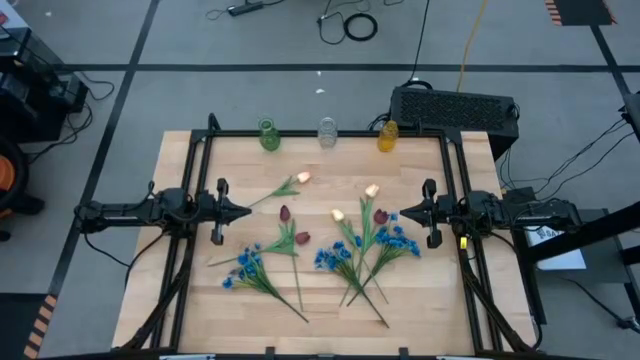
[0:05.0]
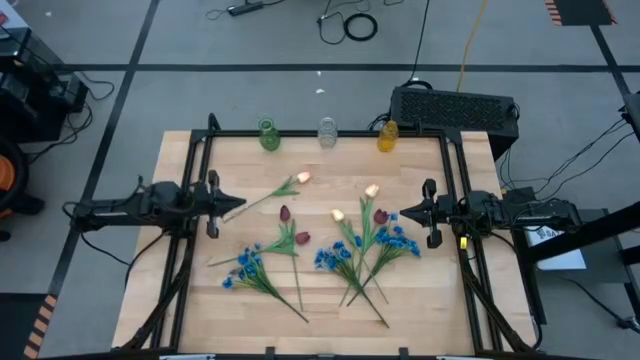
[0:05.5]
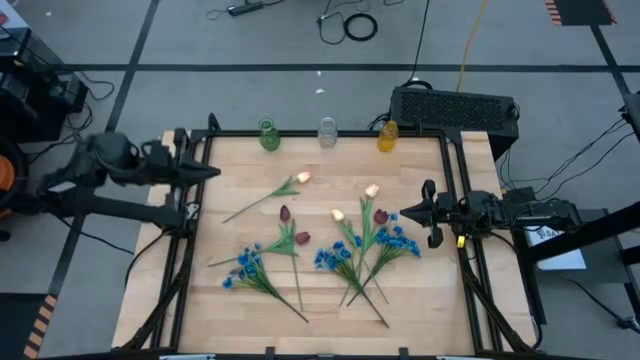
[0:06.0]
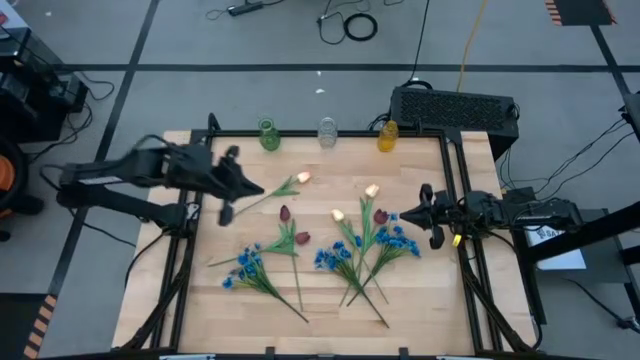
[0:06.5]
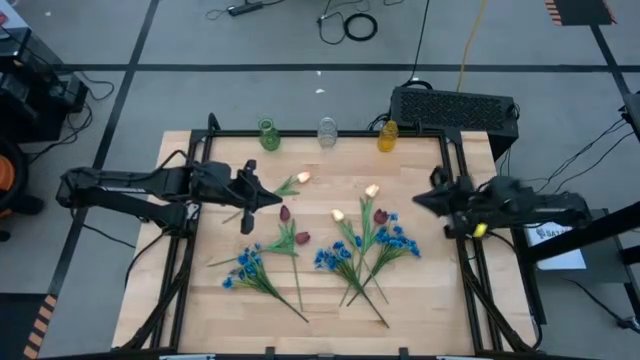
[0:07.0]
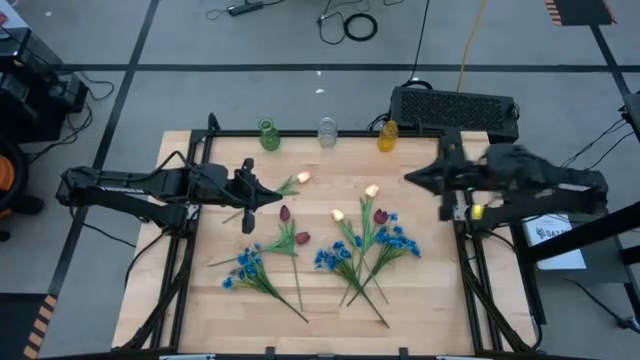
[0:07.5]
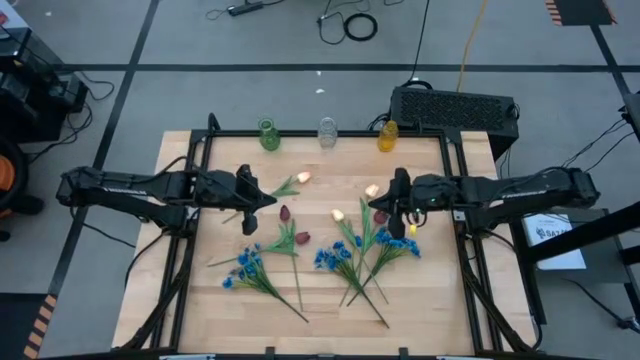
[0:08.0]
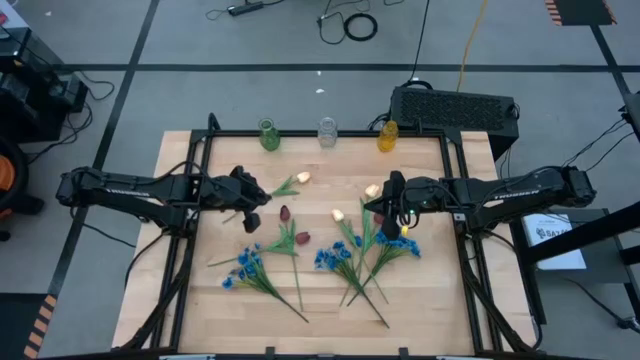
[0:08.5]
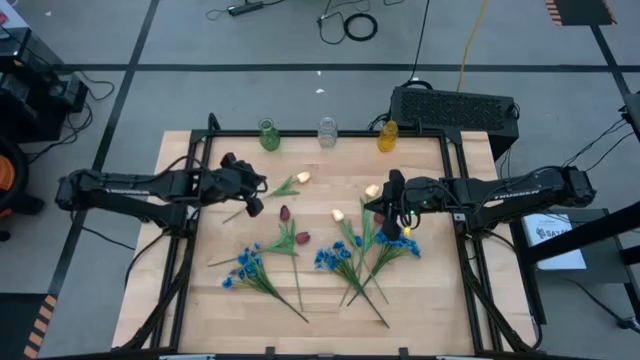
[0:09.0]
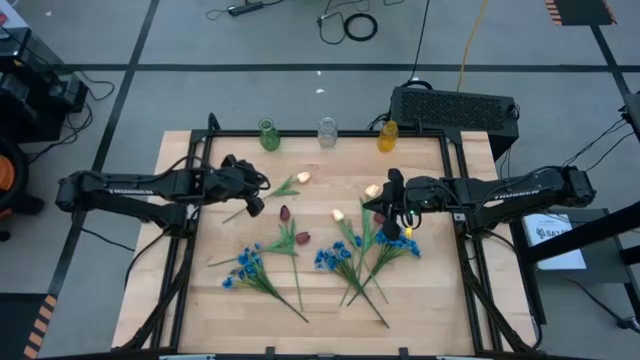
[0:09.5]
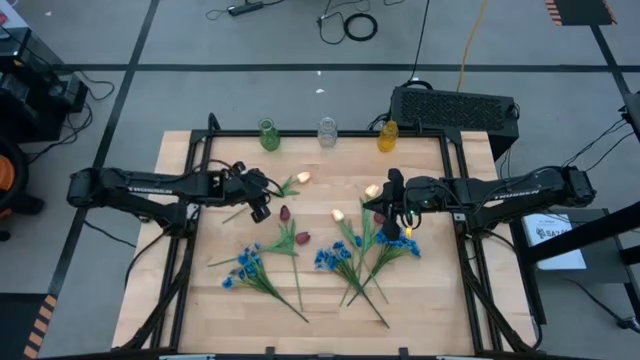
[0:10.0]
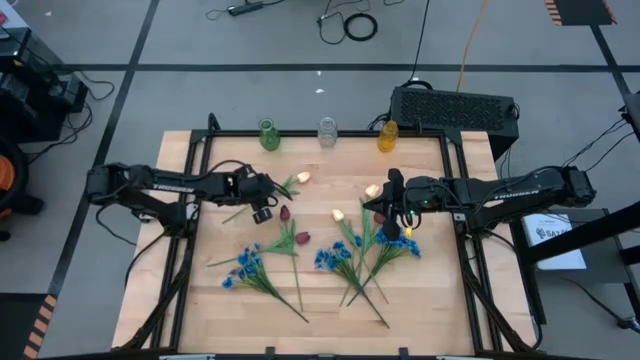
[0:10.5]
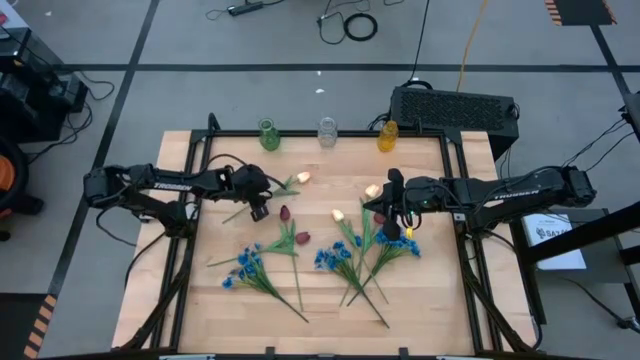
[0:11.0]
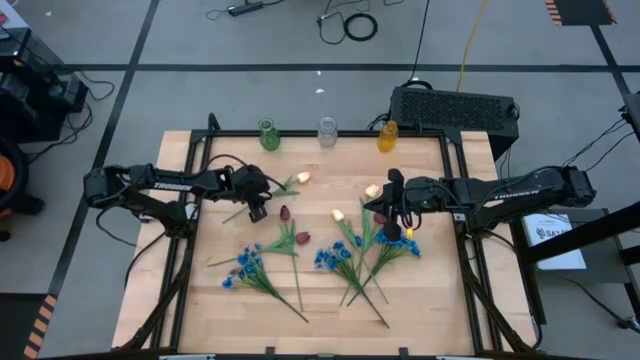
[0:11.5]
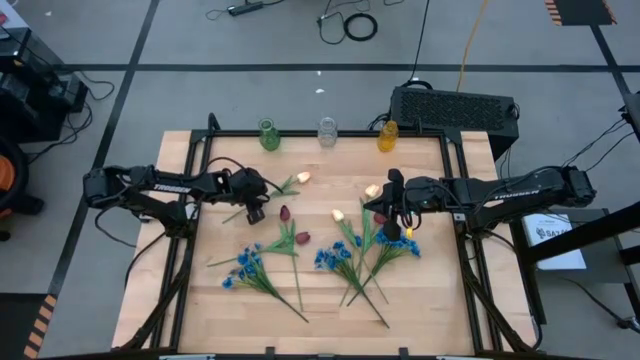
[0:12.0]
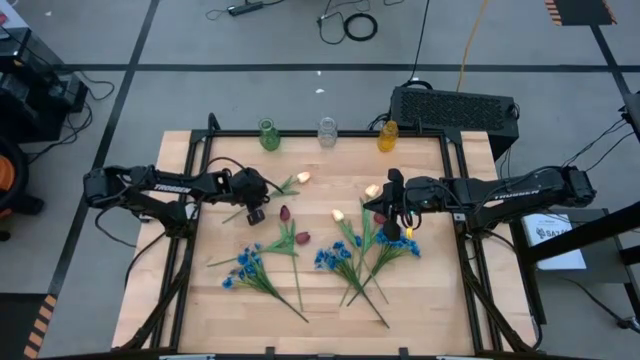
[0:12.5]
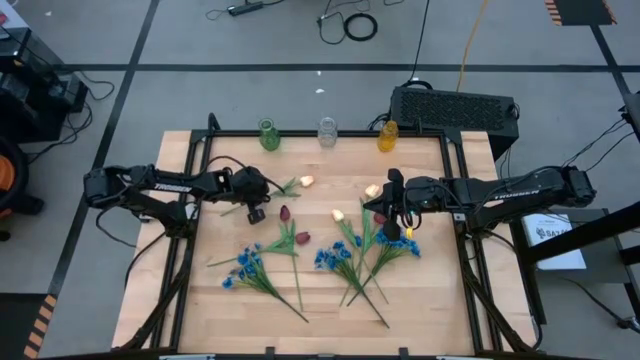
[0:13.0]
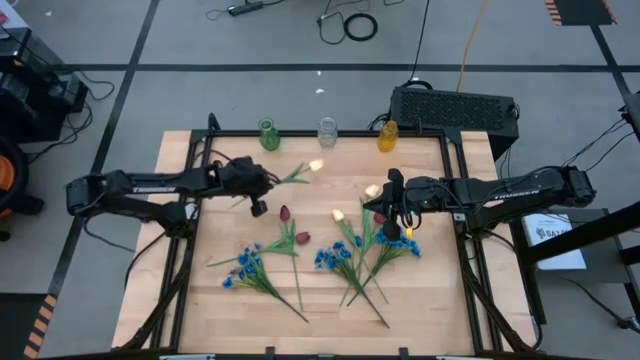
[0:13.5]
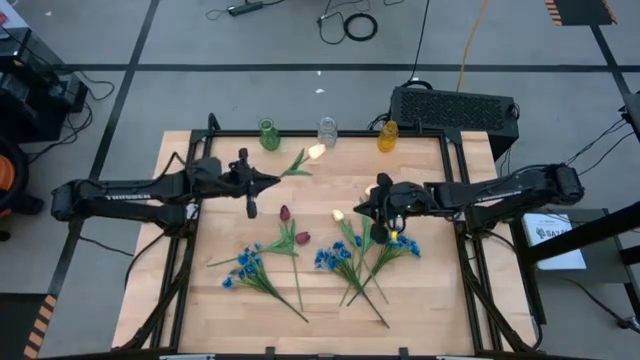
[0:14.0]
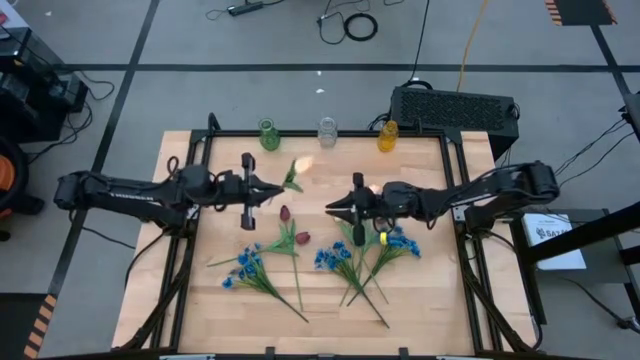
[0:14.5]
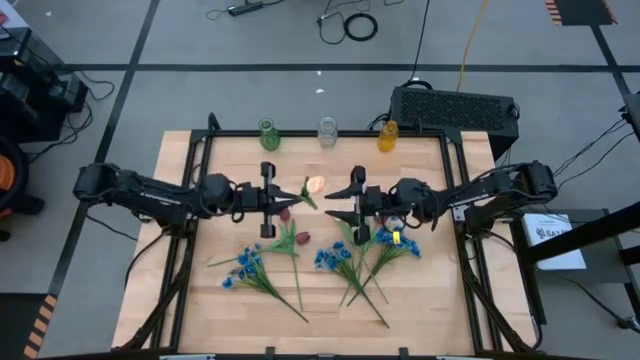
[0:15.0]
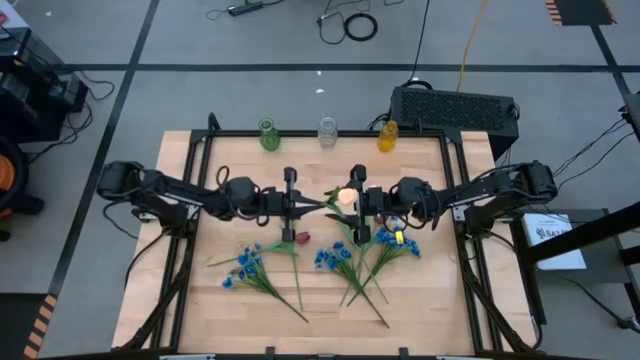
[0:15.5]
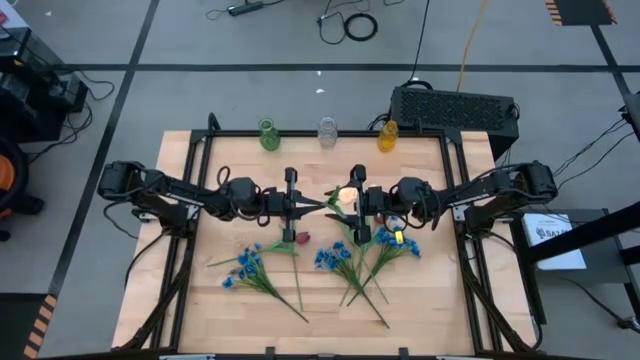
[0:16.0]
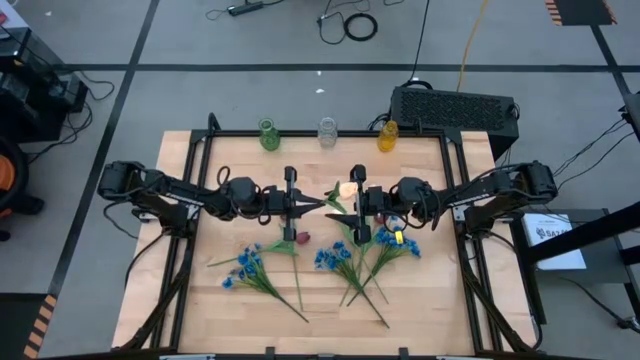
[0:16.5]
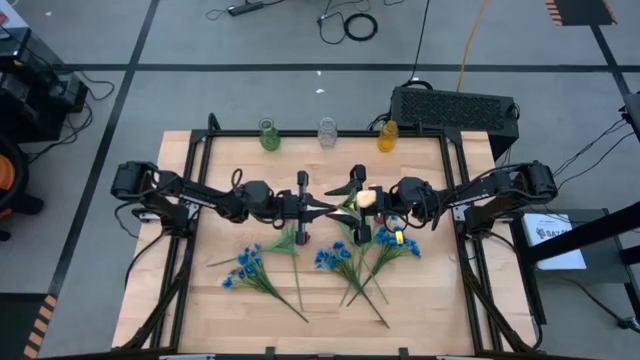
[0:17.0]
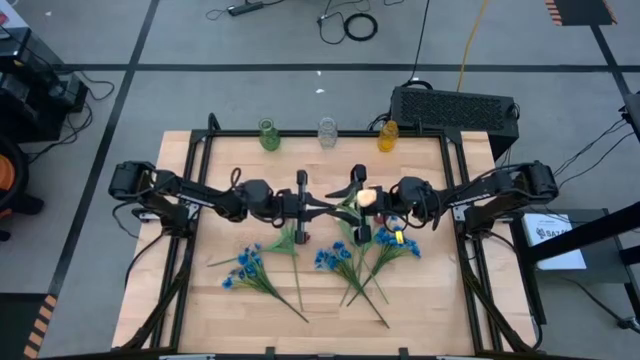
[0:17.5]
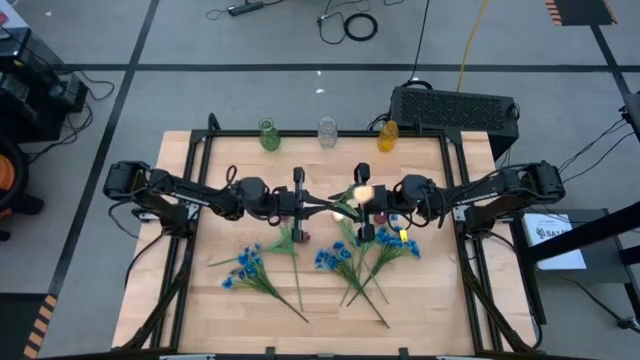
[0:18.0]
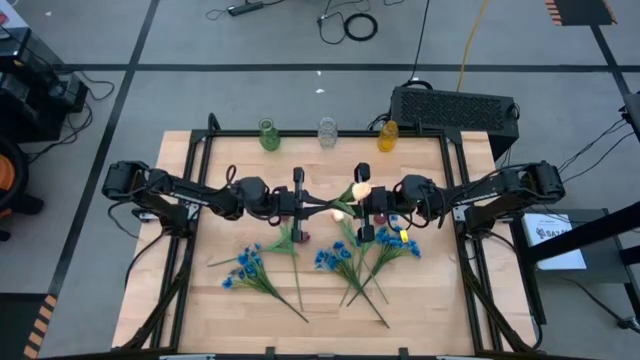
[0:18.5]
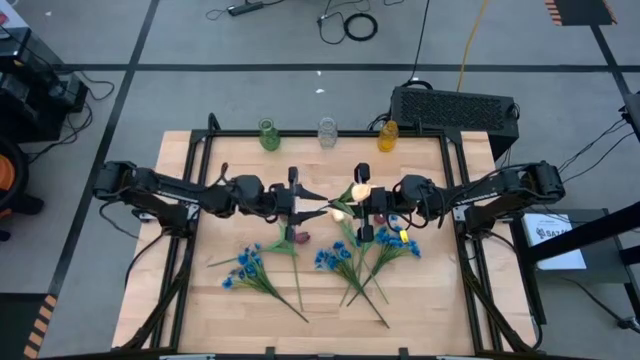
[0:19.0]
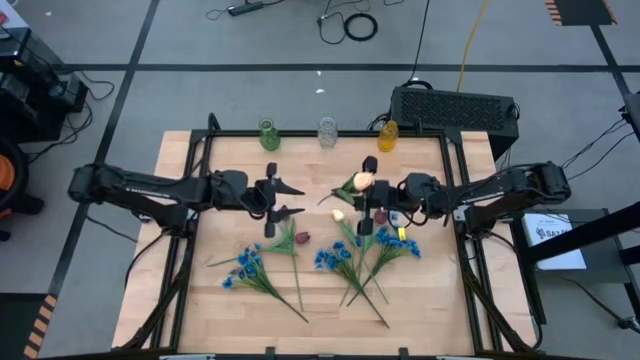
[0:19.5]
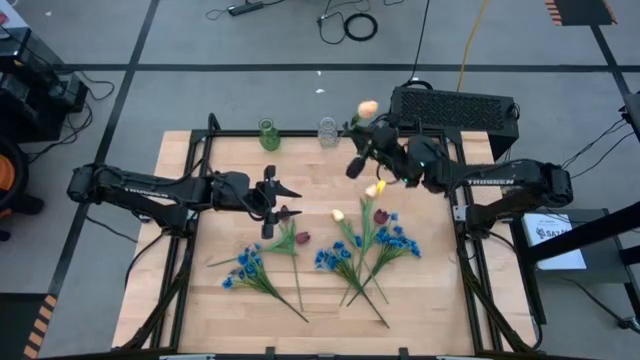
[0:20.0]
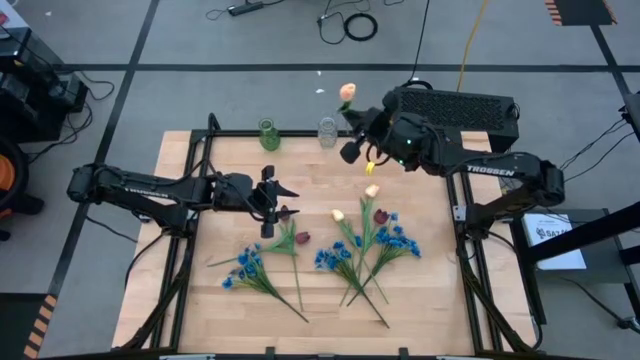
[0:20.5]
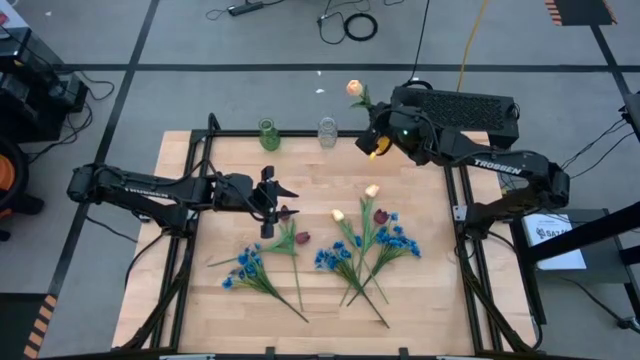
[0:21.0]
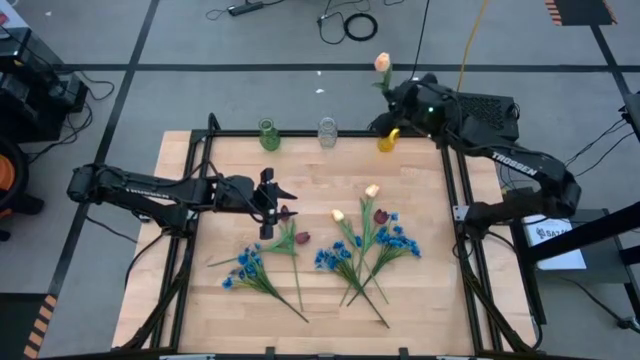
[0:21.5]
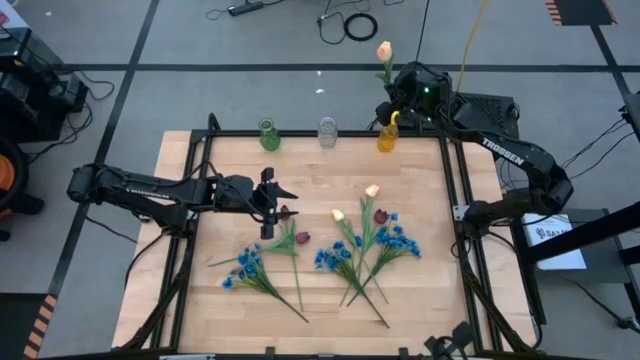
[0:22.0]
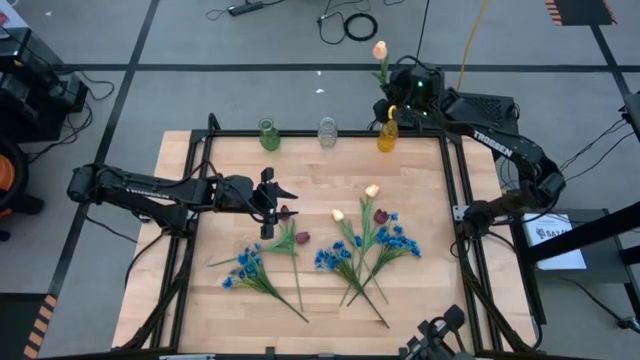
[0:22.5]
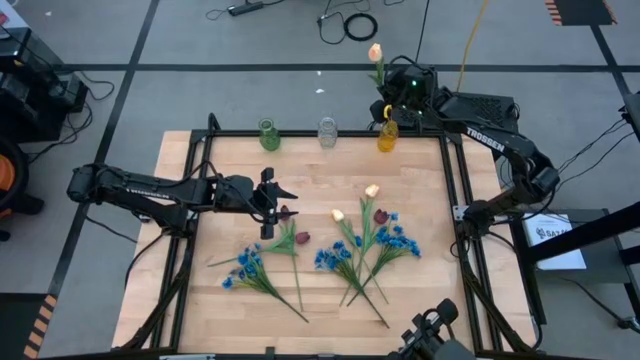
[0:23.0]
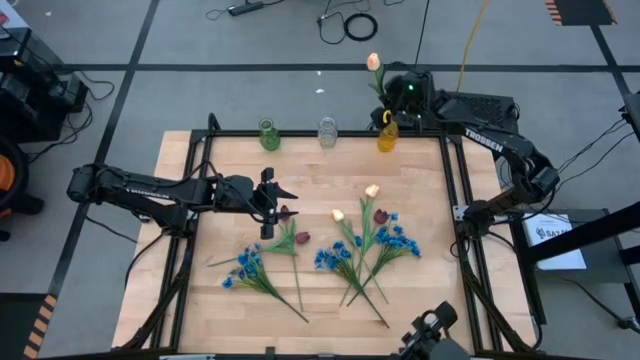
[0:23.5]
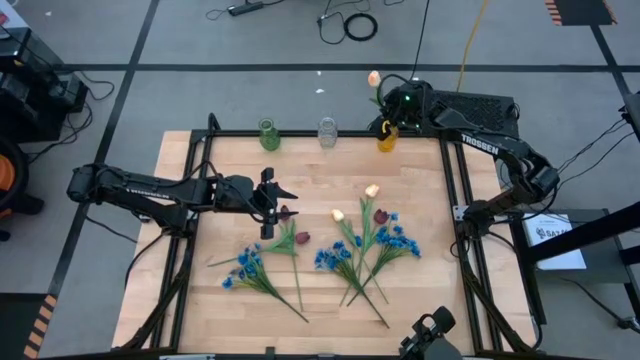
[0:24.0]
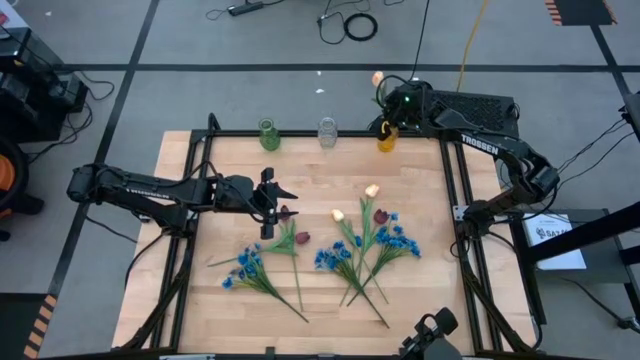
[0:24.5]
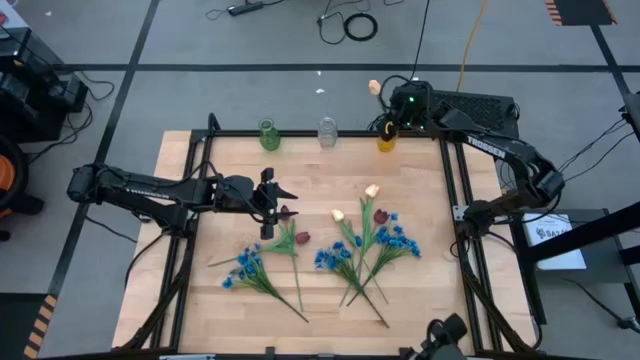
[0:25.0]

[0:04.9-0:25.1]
Task: Sort flowers into vase by color
Put the left yellow tulip into the orange vase
